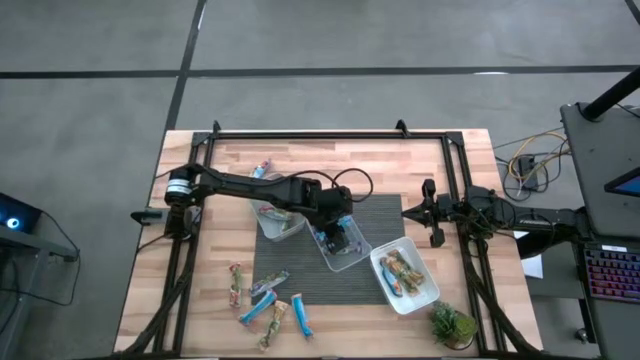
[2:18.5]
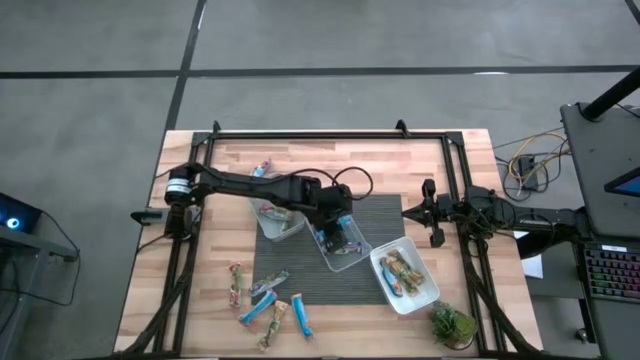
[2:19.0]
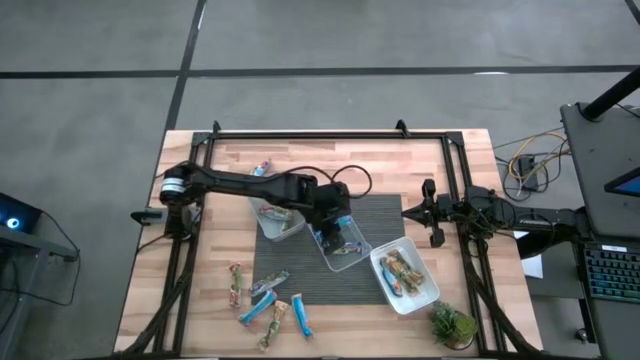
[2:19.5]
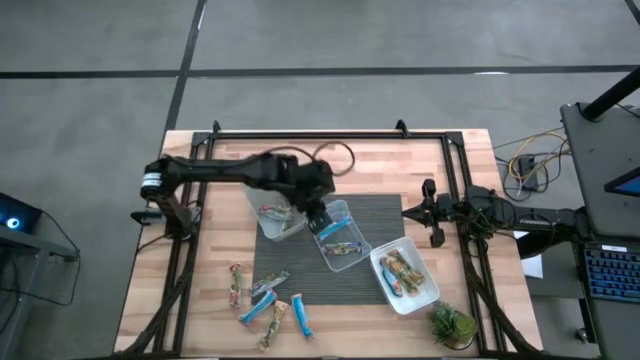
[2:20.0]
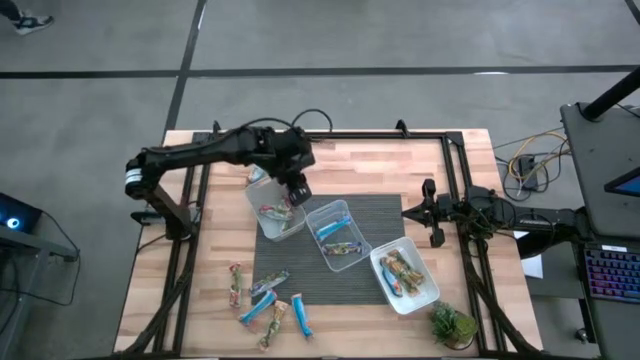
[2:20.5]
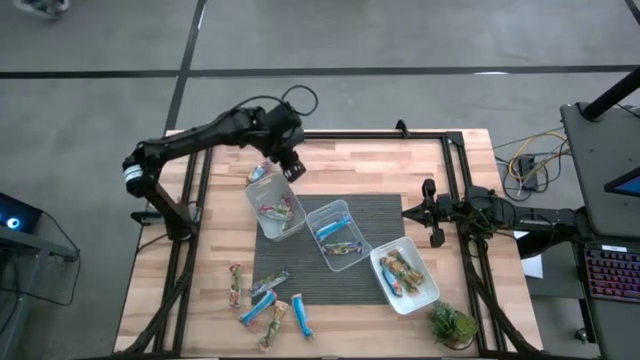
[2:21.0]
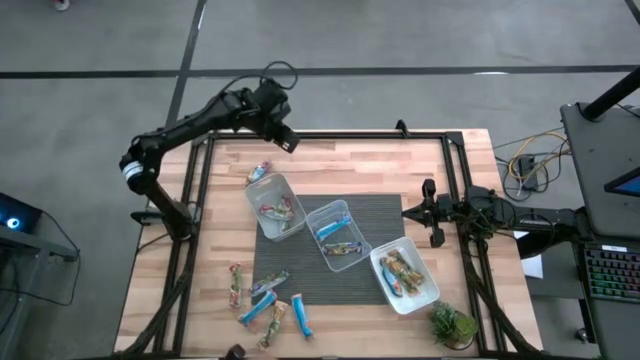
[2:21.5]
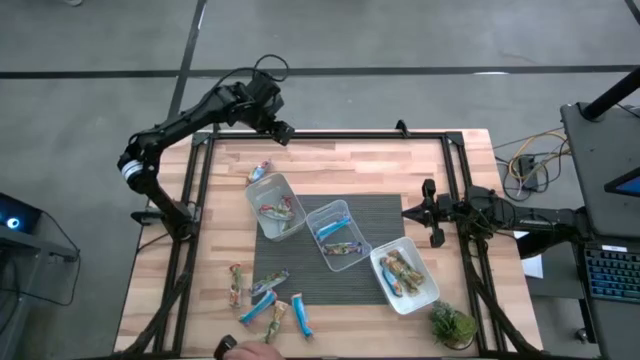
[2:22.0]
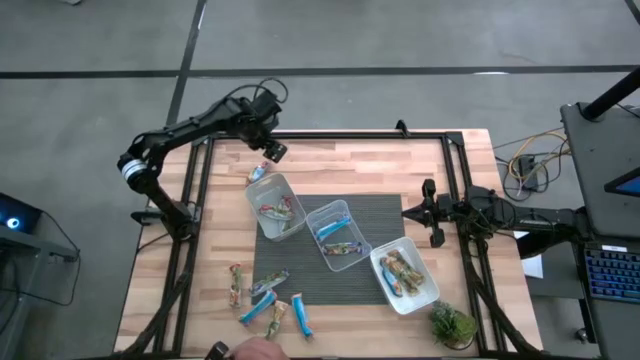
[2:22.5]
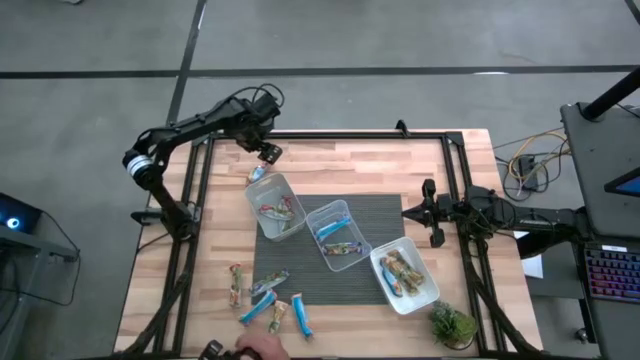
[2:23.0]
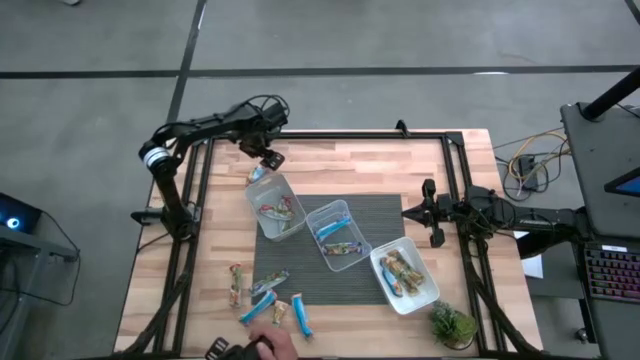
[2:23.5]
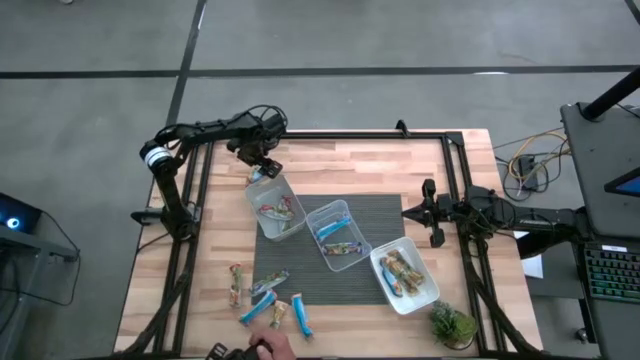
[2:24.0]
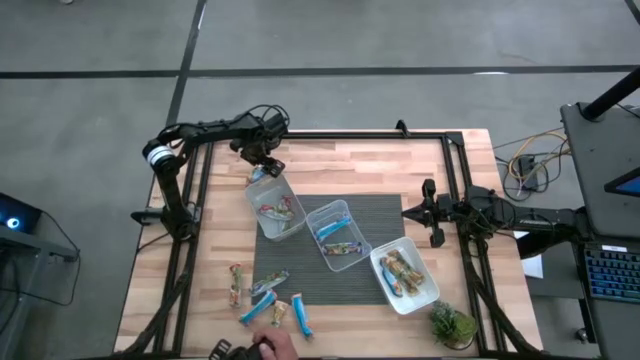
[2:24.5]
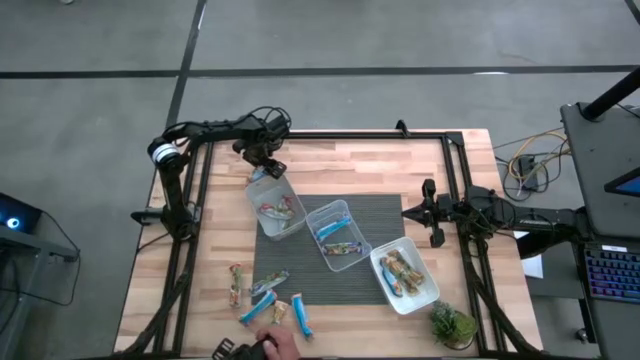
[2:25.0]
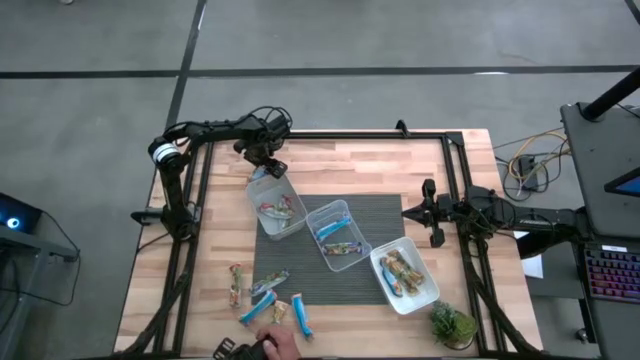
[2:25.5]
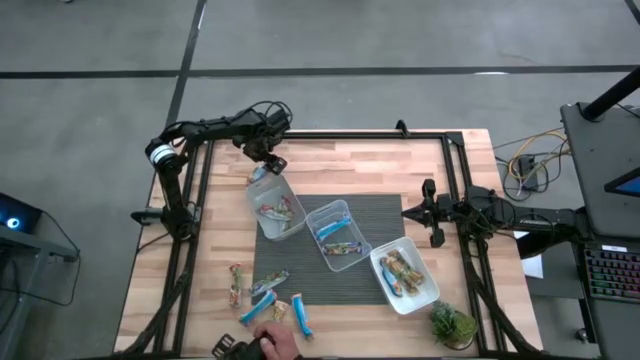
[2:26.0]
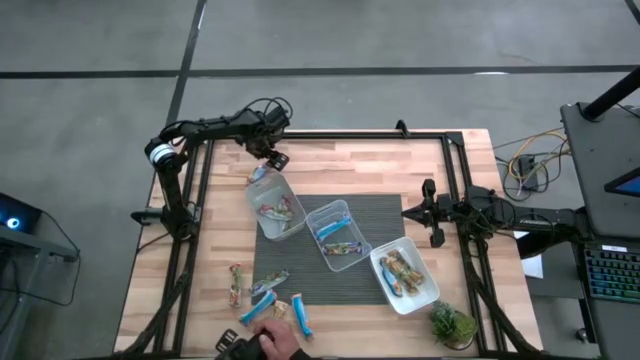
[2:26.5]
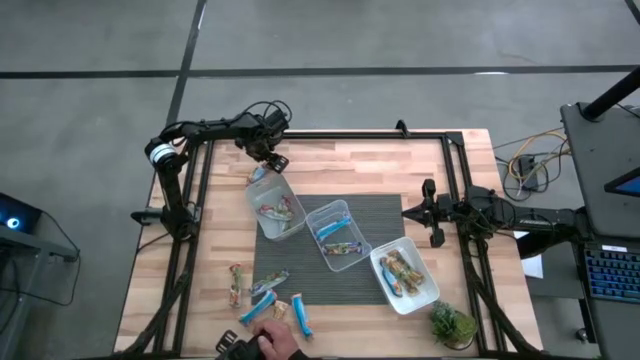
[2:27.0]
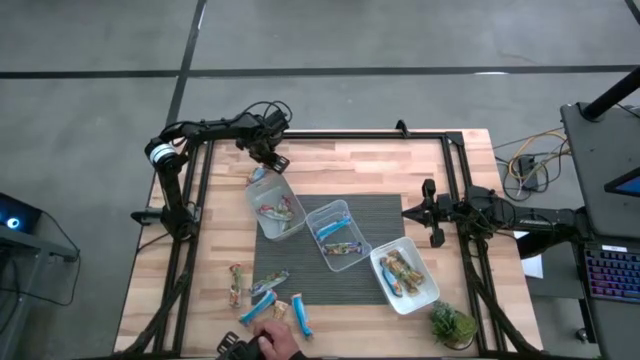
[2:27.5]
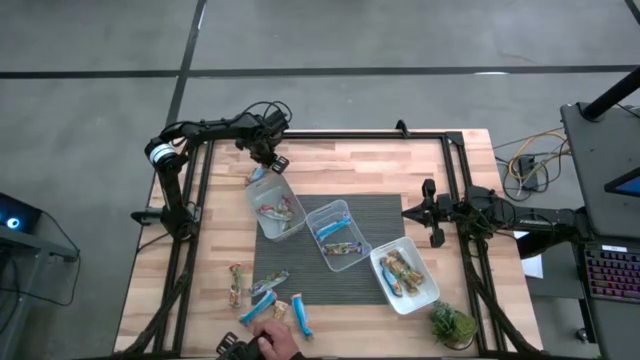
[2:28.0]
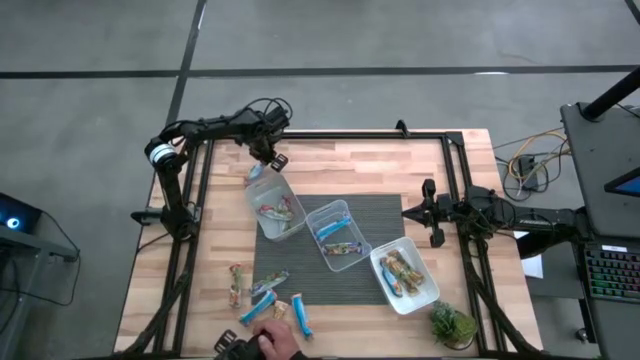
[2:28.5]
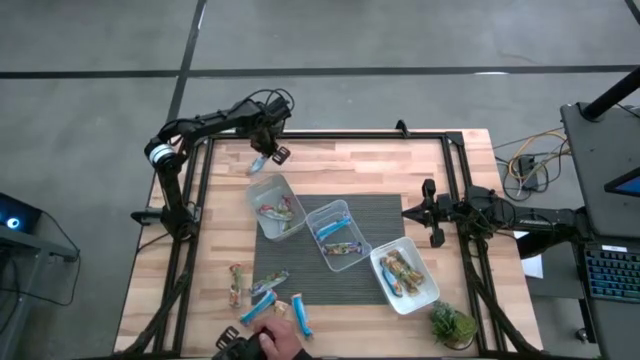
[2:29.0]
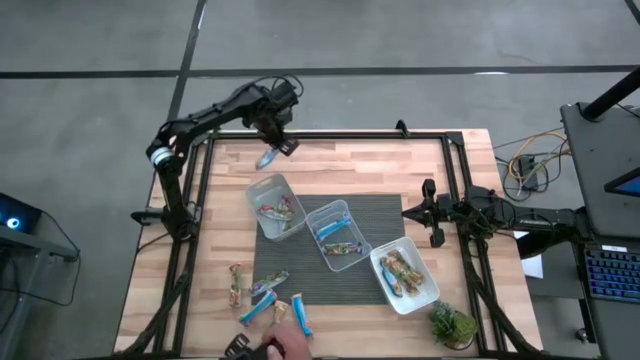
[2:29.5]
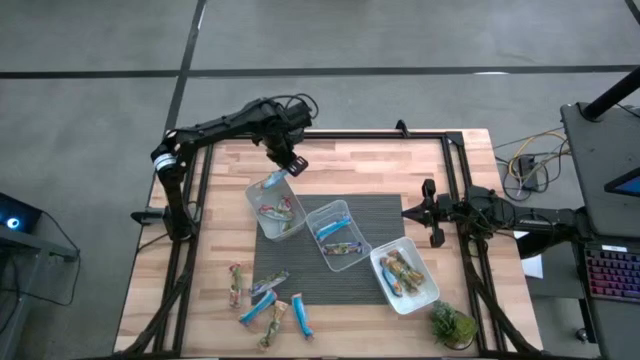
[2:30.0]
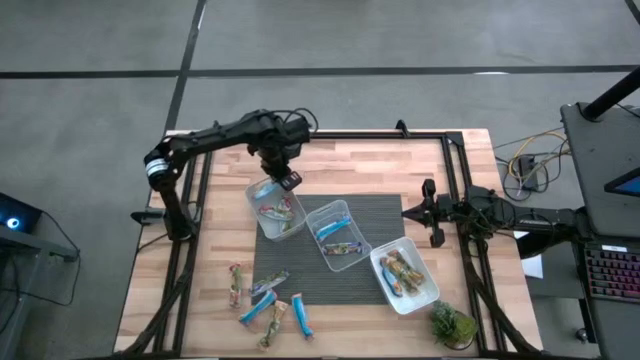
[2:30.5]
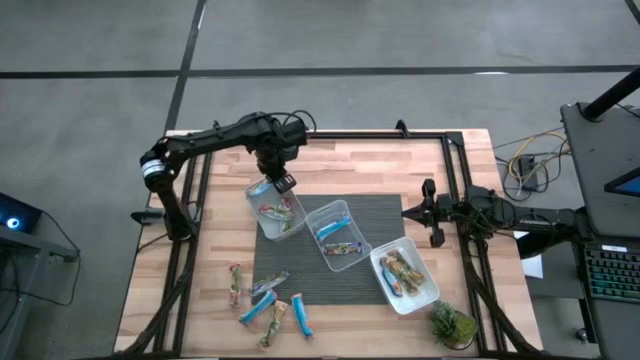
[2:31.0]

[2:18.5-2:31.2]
Task: Pick and place Granola Bars by type
Put the red granola bar into the gray bin

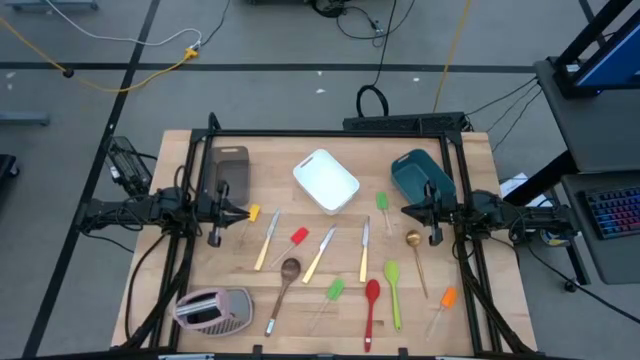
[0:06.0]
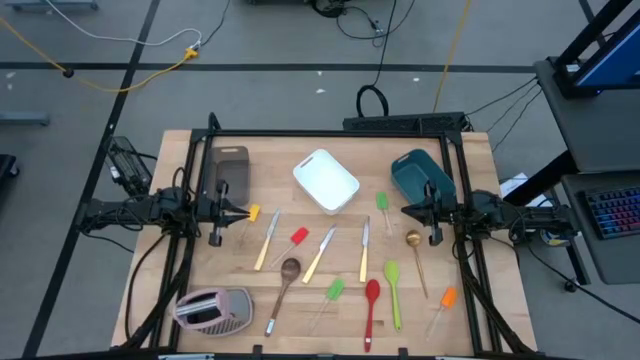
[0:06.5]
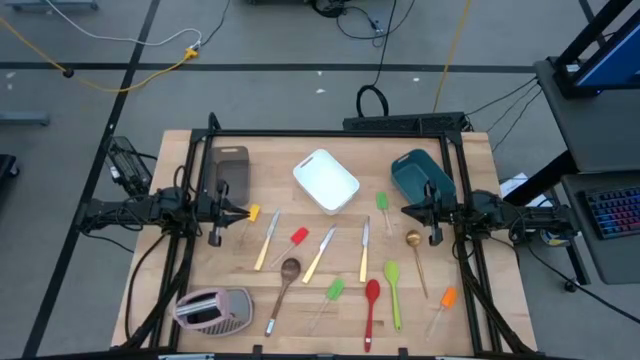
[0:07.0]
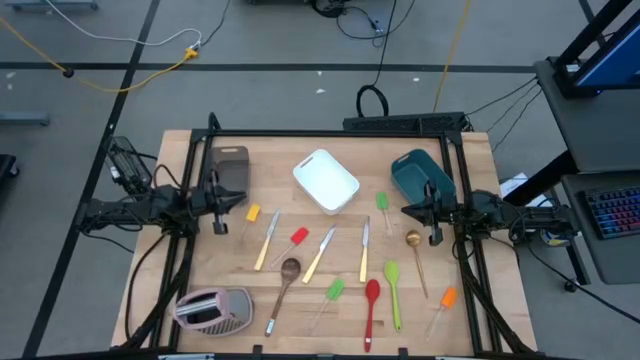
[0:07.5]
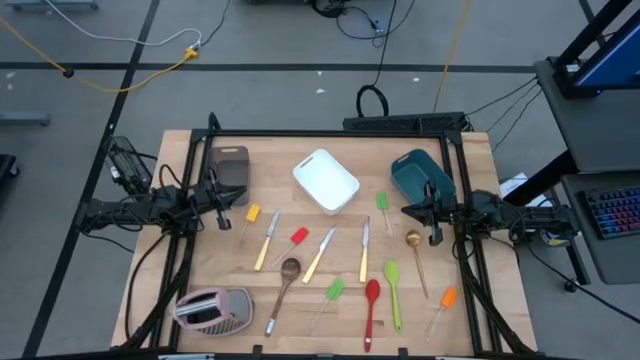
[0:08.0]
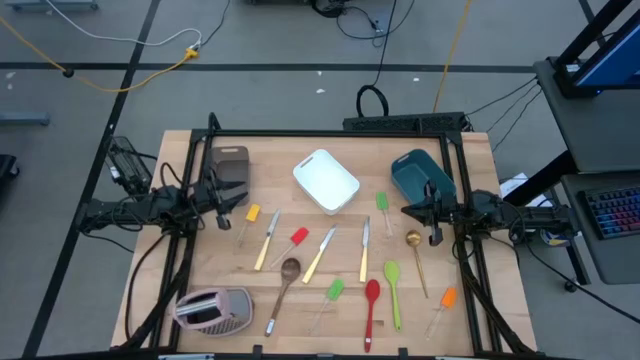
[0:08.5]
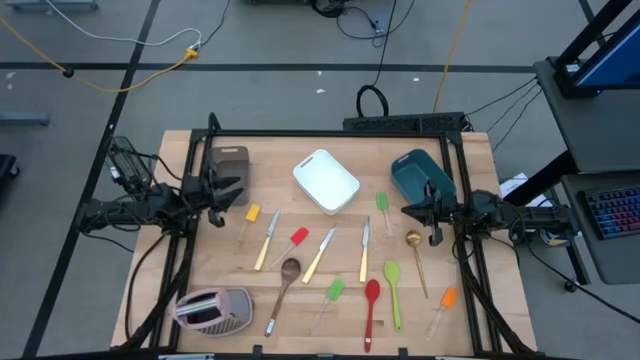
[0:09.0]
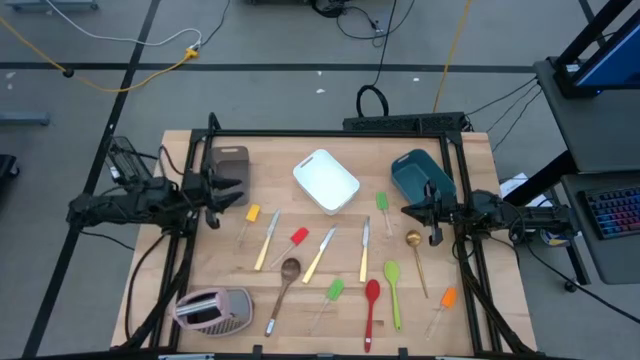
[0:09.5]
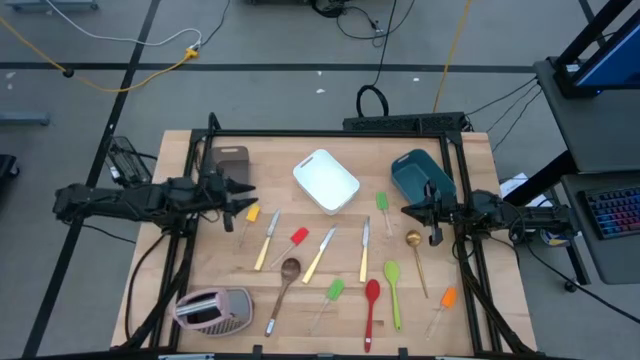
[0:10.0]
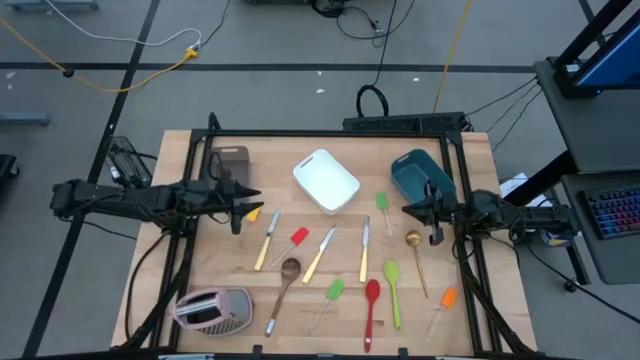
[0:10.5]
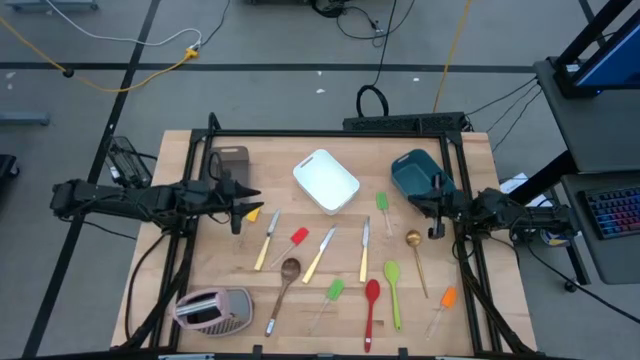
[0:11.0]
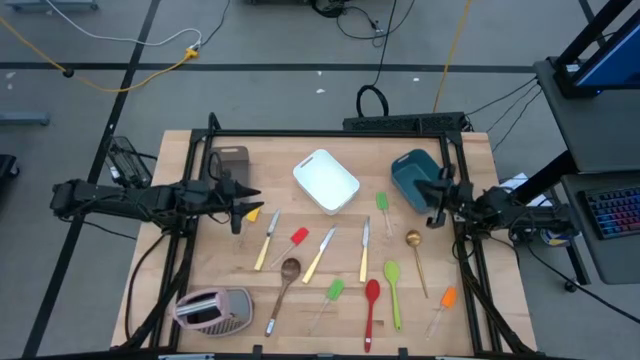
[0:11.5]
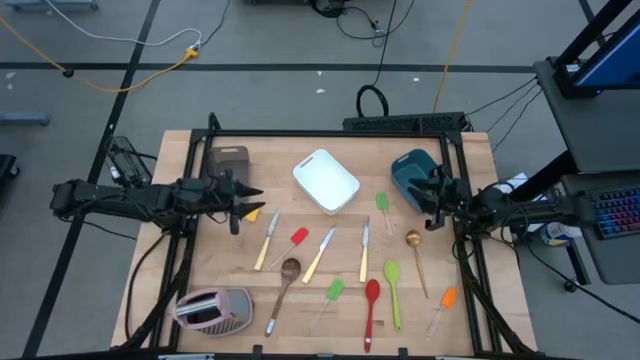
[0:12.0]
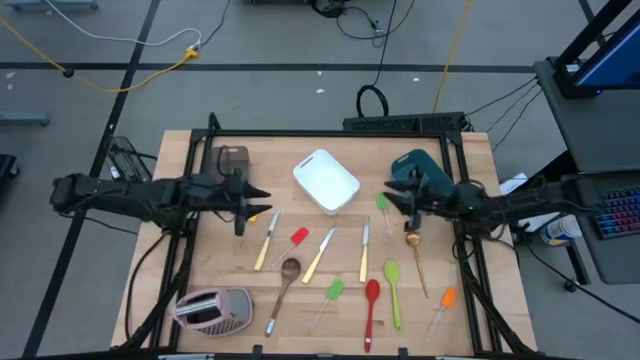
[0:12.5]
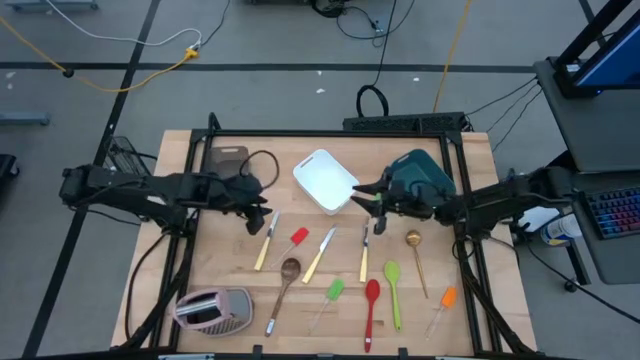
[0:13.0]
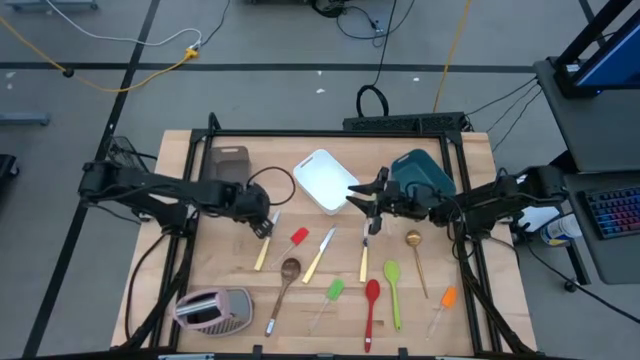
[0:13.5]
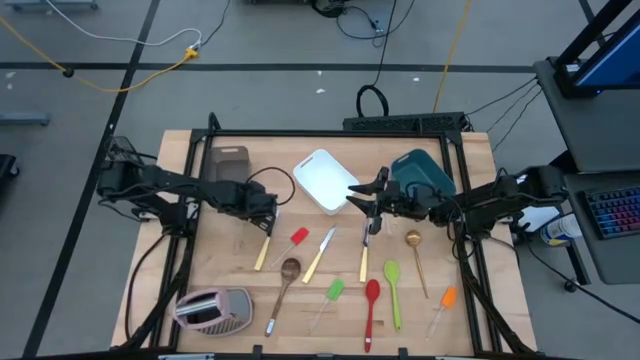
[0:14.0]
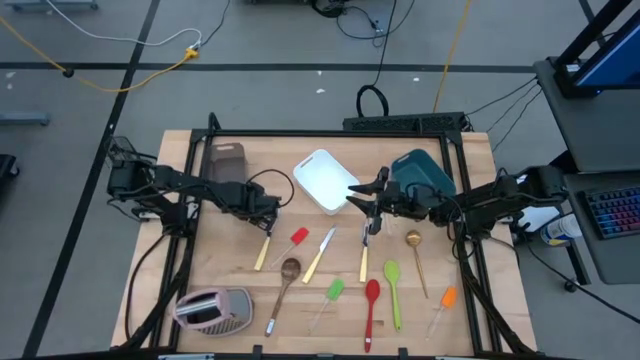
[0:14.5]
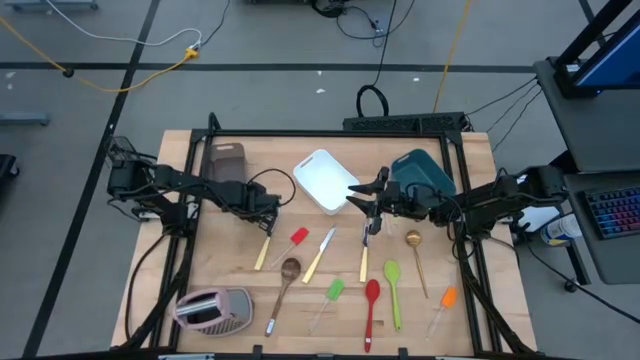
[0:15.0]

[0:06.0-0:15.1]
Task: Pick & Place Kitchen Items
Put the yellow spatula into the black bin
